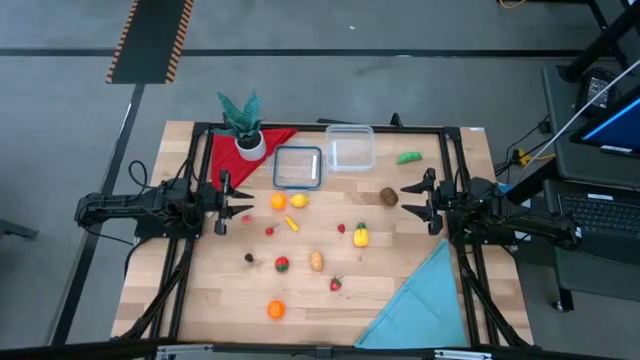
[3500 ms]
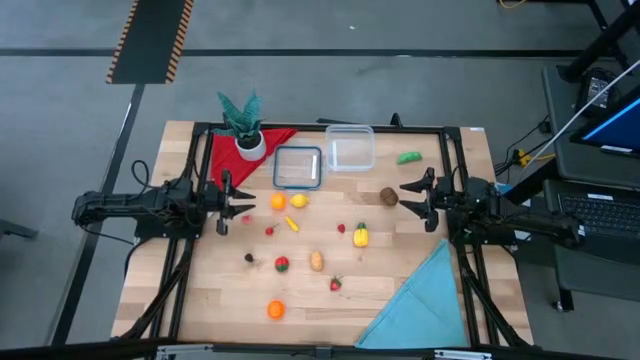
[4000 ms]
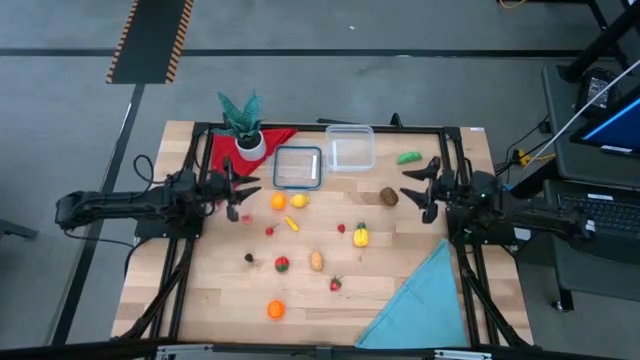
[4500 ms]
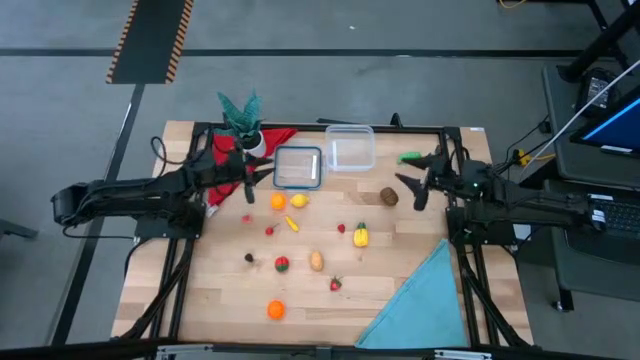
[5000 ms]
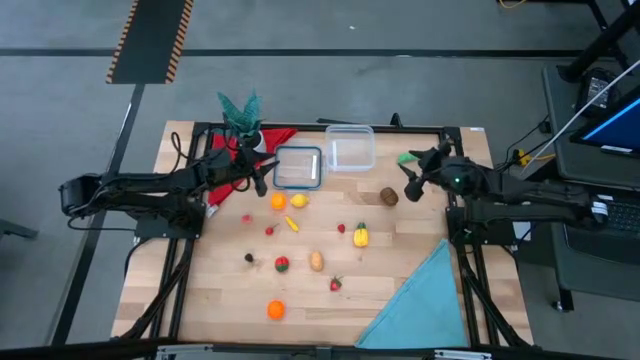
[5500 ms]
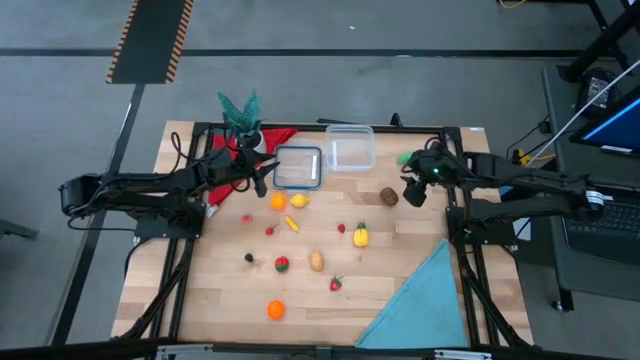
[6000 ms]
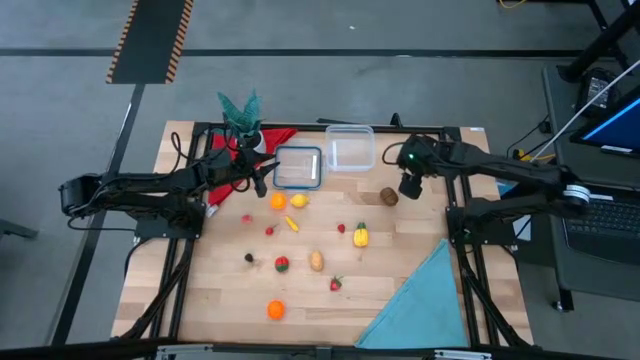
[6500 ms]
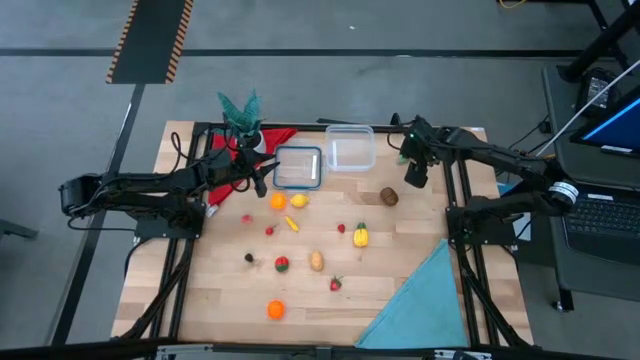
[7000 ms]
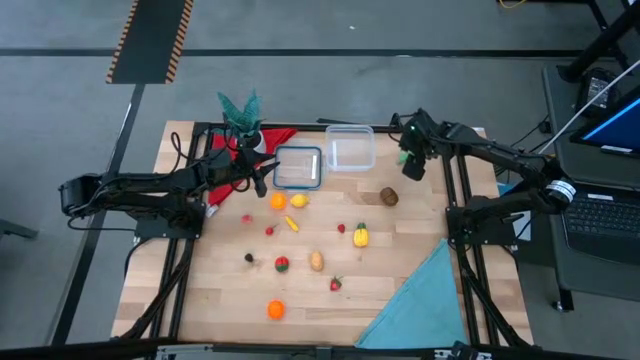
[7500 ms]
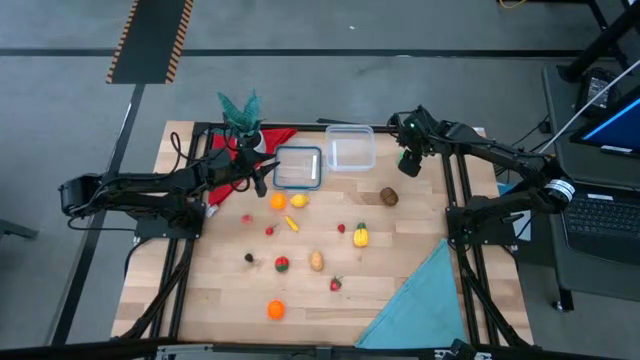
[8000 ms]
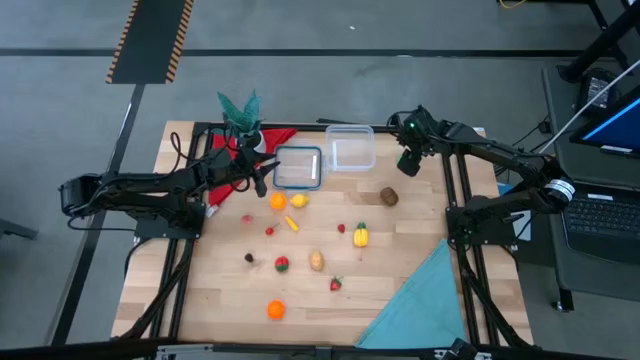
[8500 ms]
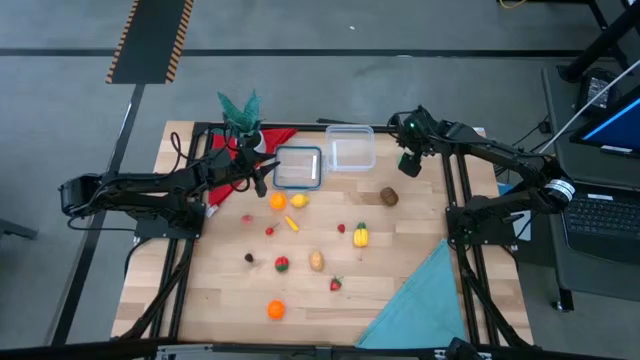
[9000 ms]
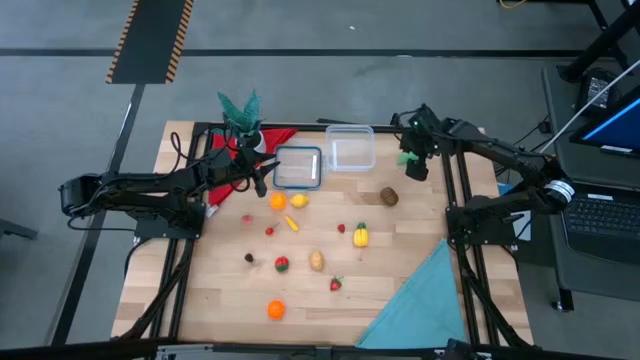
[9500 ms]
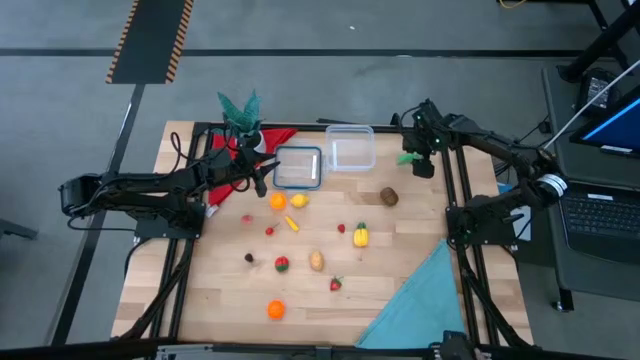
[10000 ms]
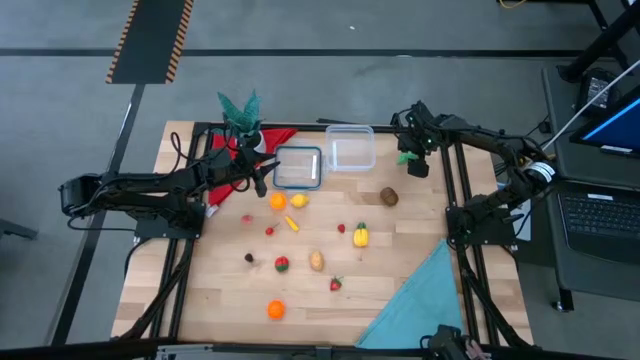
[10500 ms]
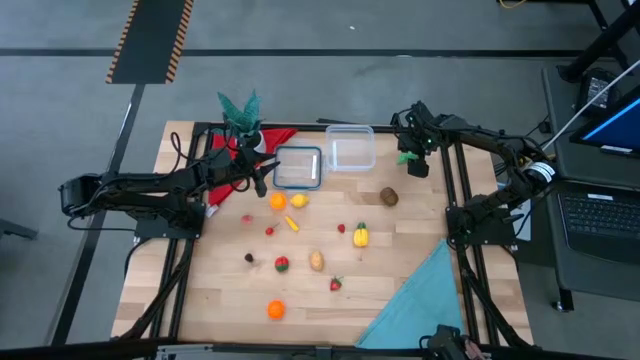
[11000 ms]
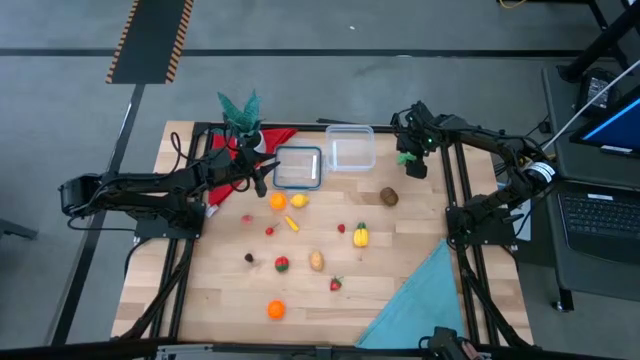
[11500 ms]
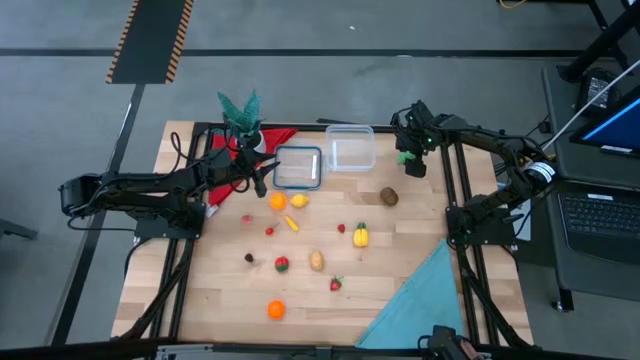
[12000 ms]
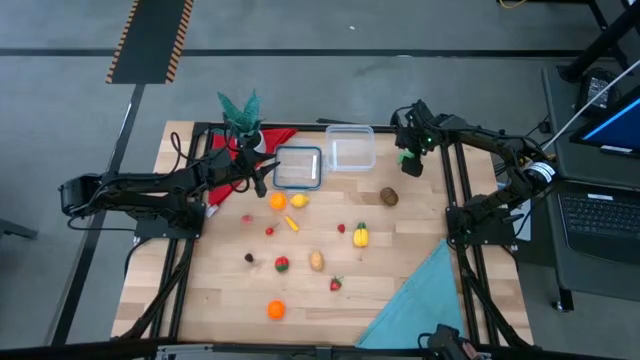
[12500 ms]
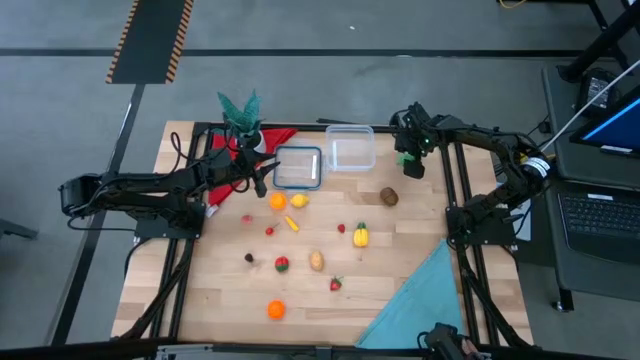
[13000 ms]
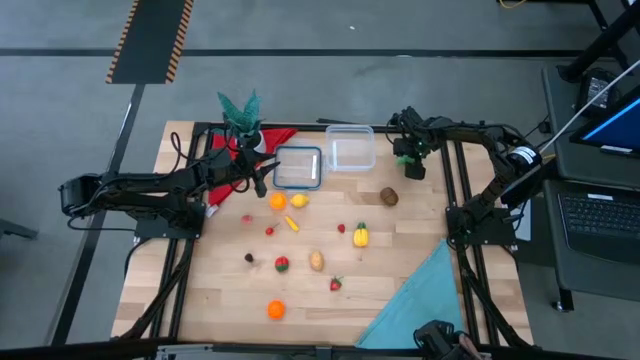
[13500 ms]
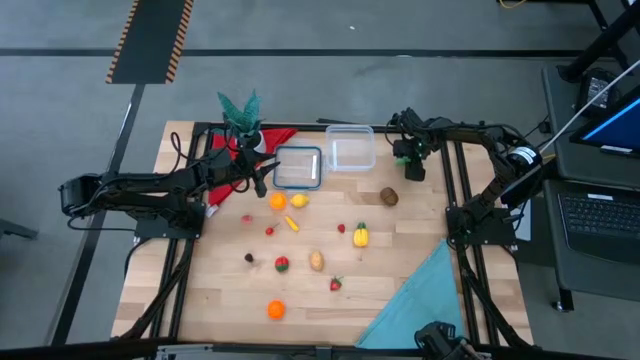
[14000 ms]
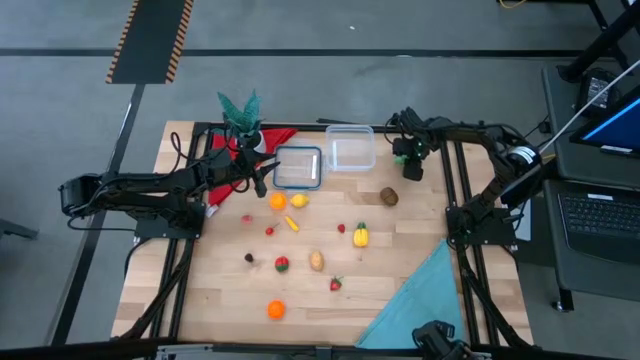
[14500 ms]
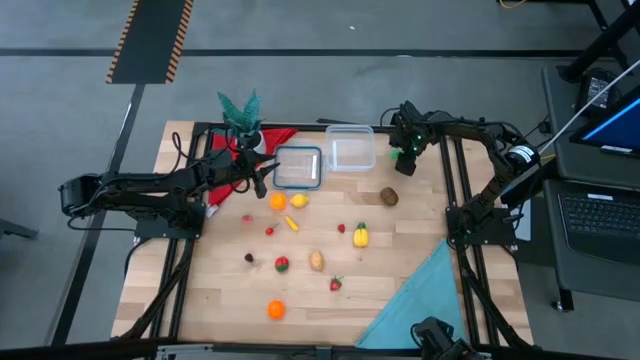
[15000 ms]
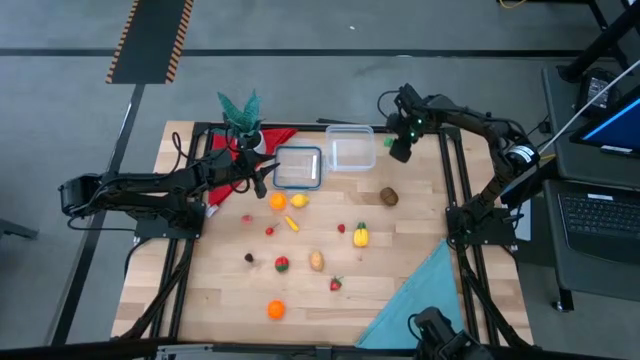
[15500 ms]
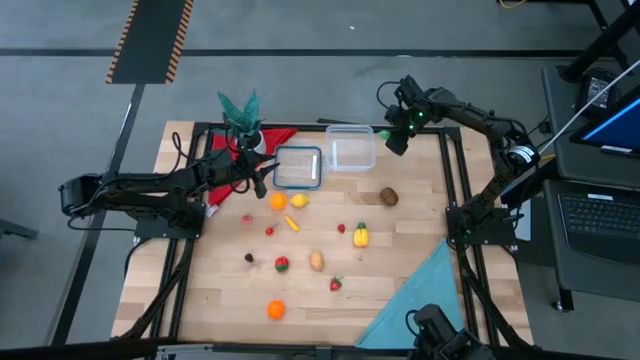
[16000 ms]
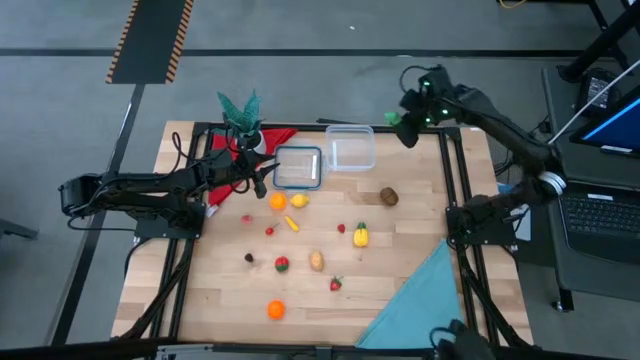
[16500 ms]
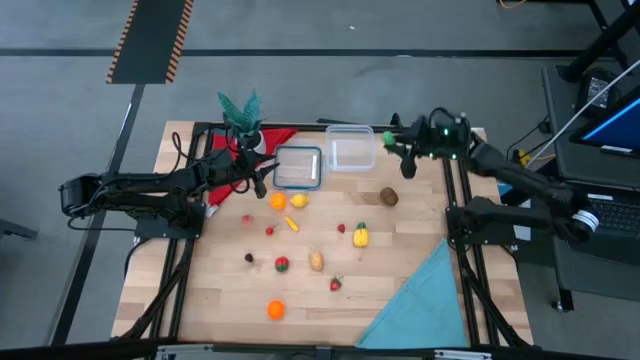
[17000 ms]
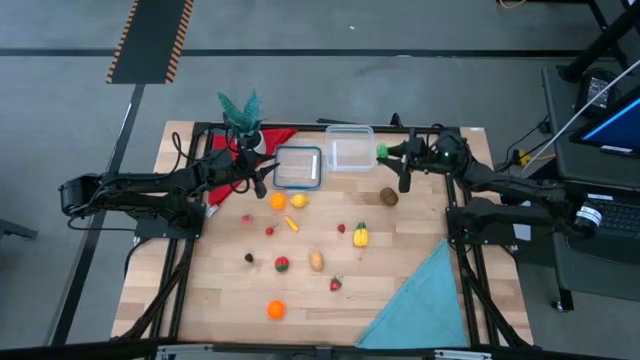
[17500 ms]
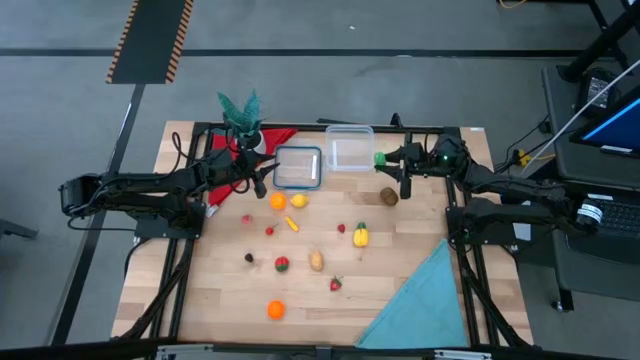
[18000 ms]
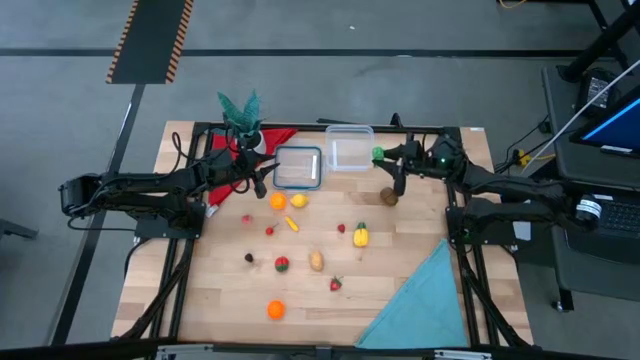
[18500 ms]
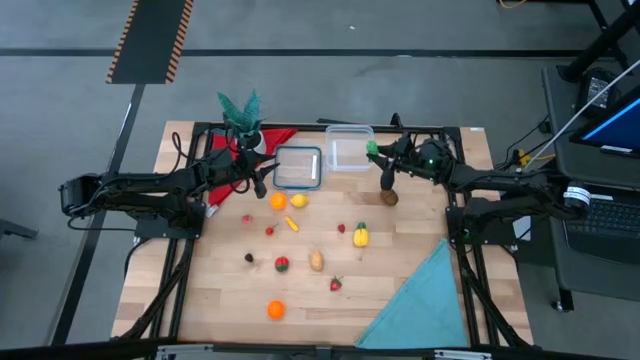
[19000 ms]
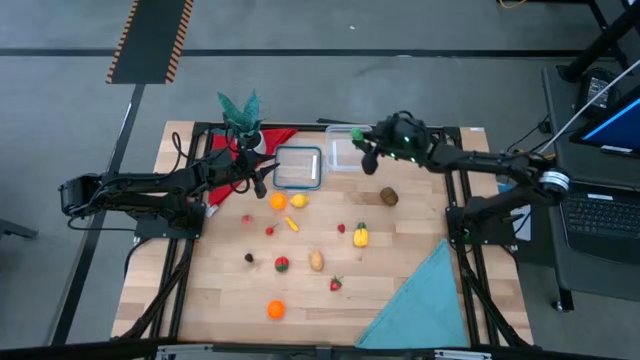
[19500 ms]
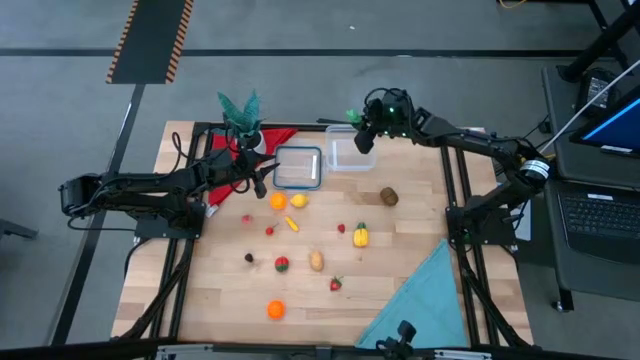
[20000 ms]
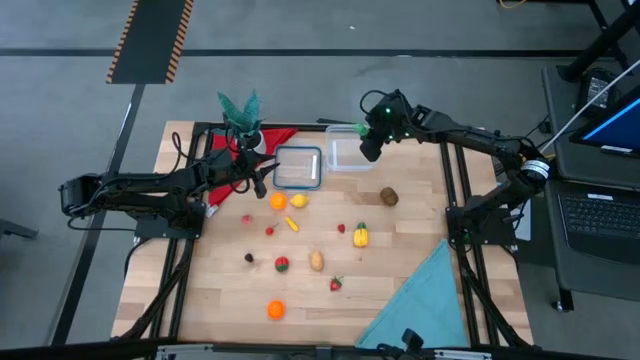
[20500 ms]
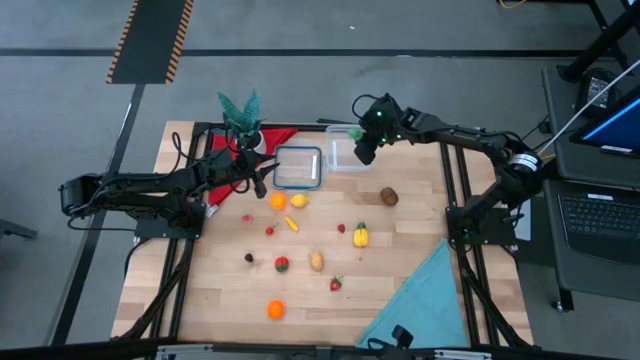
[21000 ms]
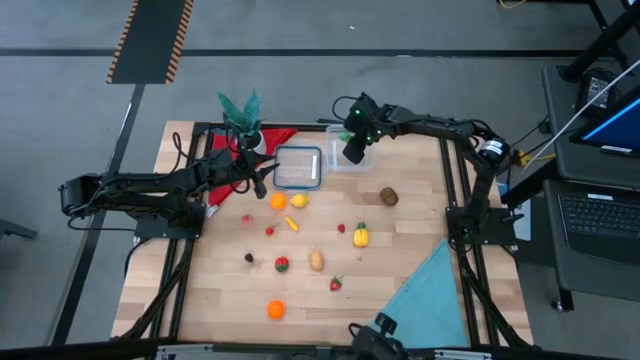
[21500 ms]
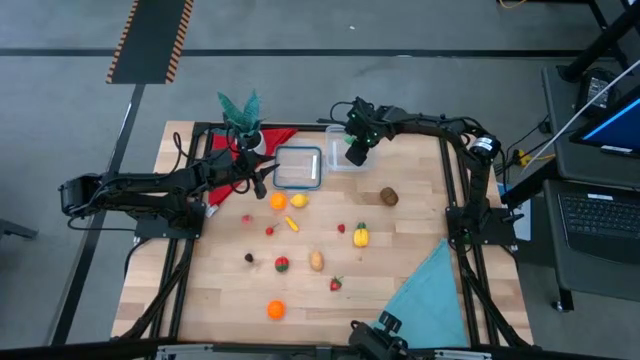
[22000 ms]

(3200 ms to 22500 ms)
Task: Pick and placing Produce into tupperware
Put the green peas into the transparent bin
